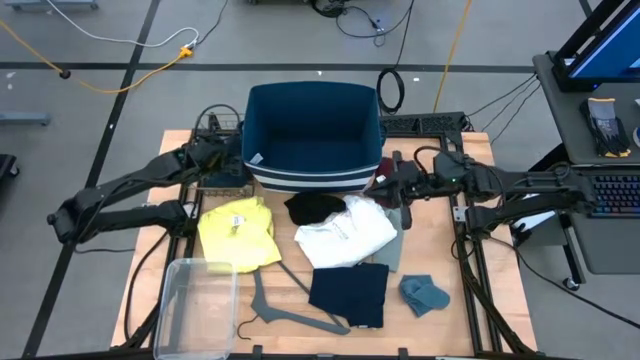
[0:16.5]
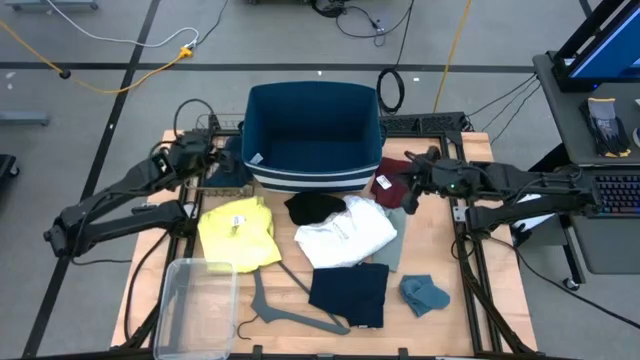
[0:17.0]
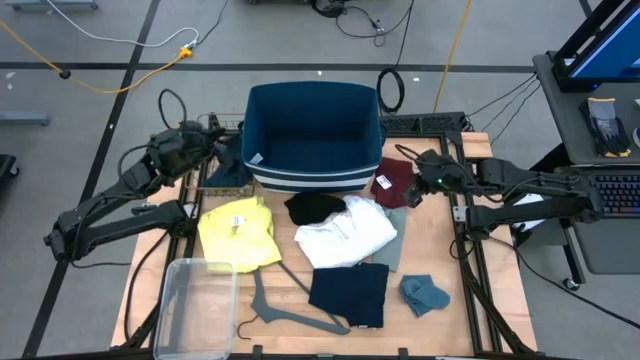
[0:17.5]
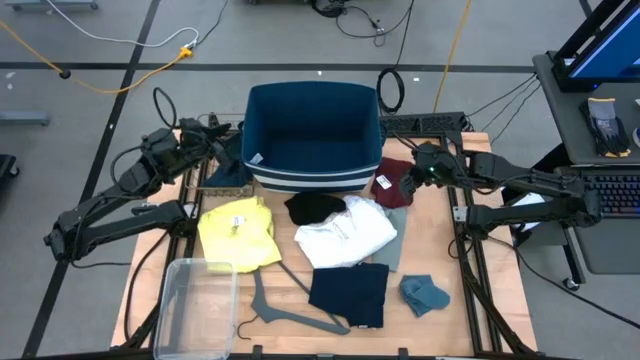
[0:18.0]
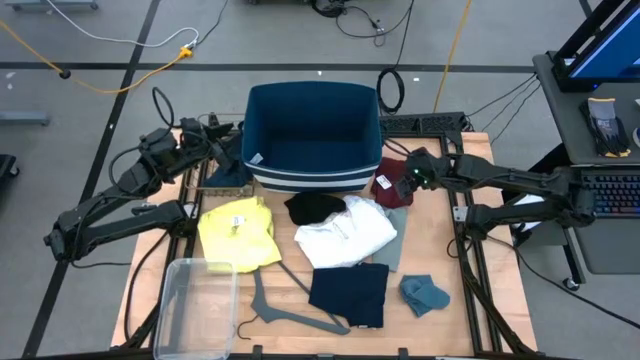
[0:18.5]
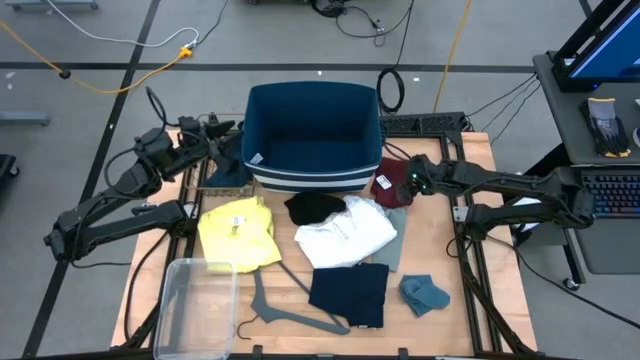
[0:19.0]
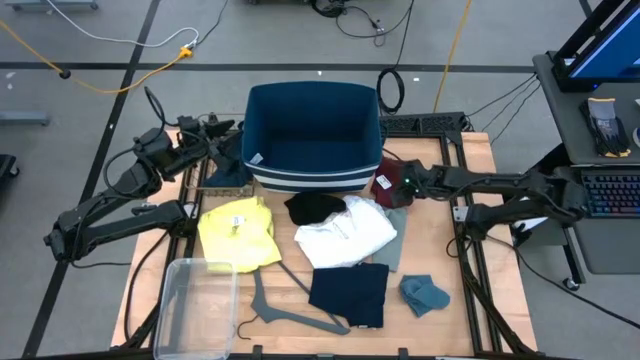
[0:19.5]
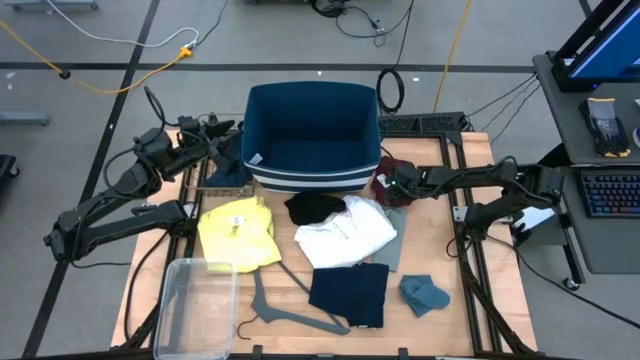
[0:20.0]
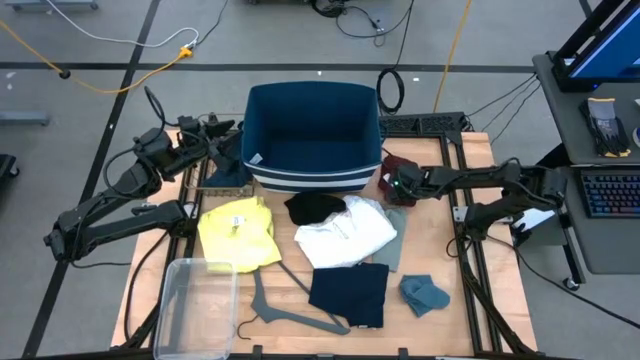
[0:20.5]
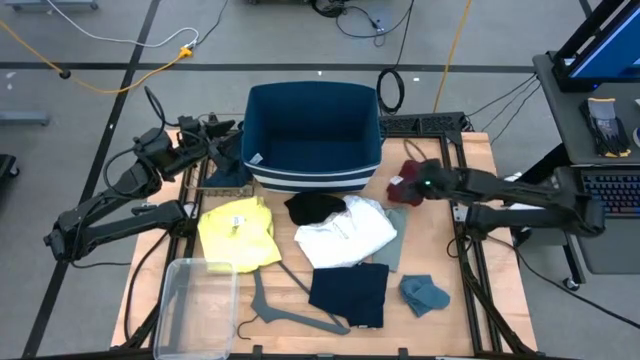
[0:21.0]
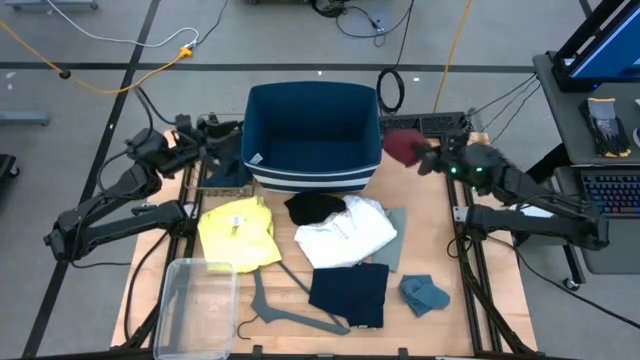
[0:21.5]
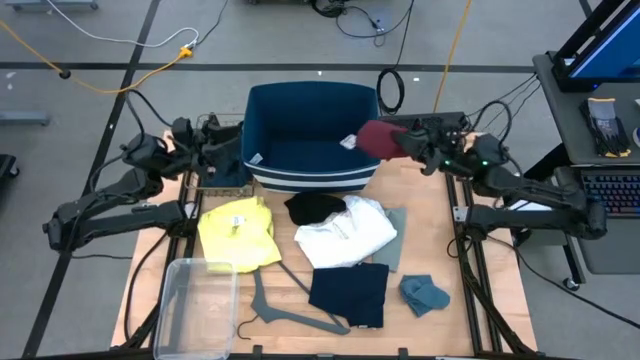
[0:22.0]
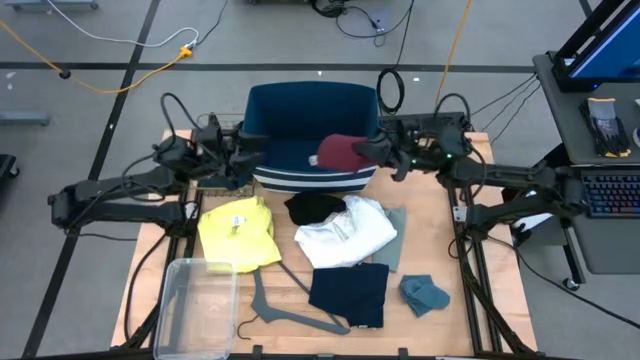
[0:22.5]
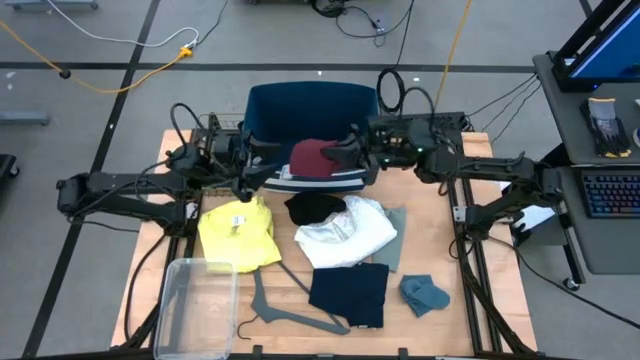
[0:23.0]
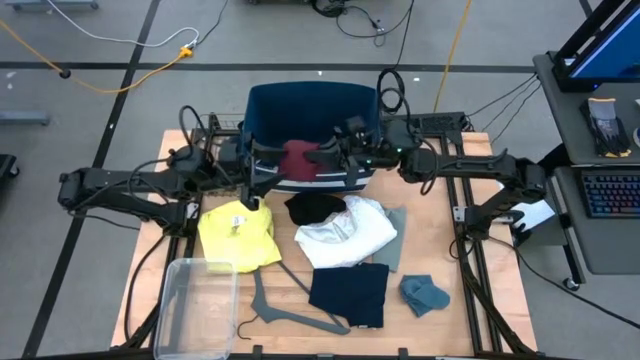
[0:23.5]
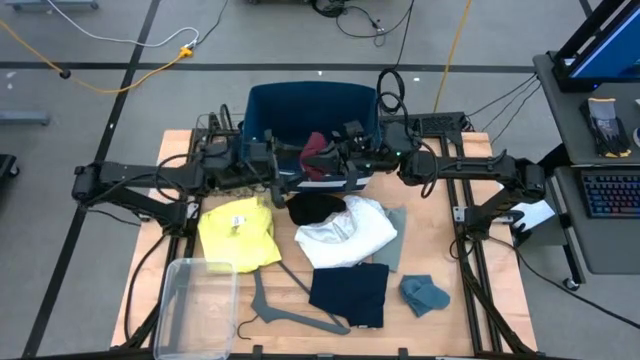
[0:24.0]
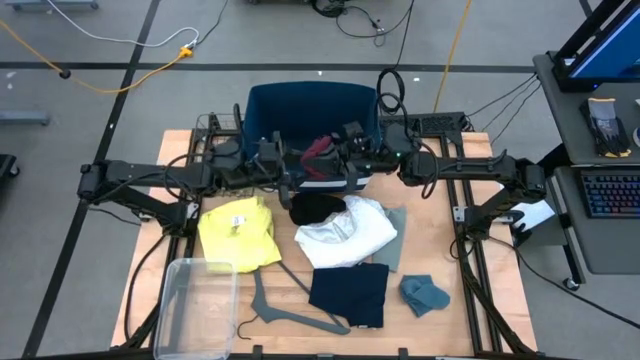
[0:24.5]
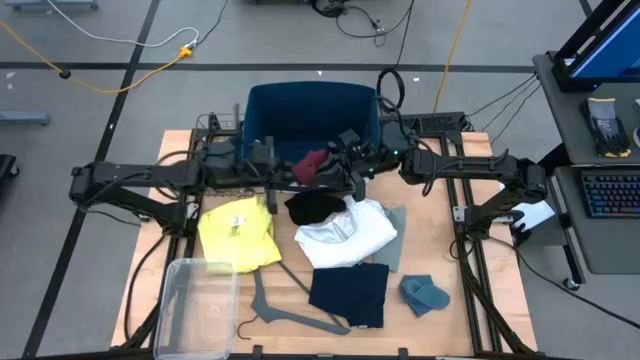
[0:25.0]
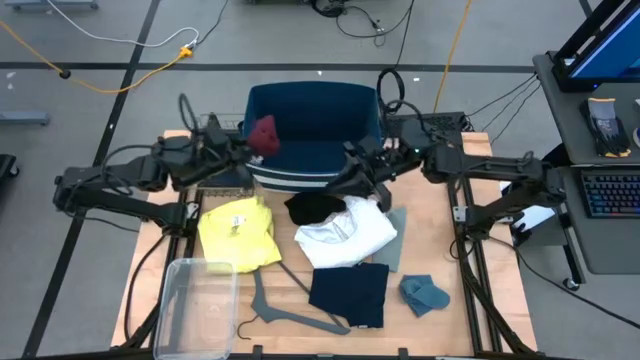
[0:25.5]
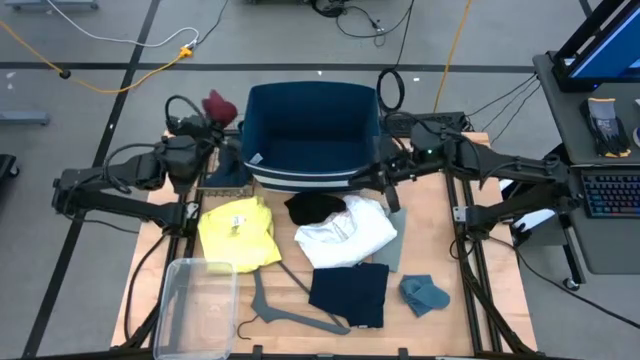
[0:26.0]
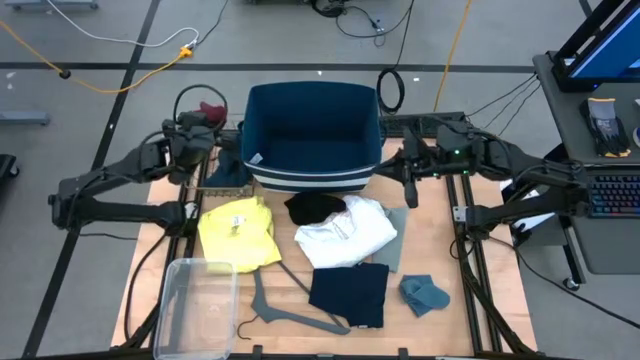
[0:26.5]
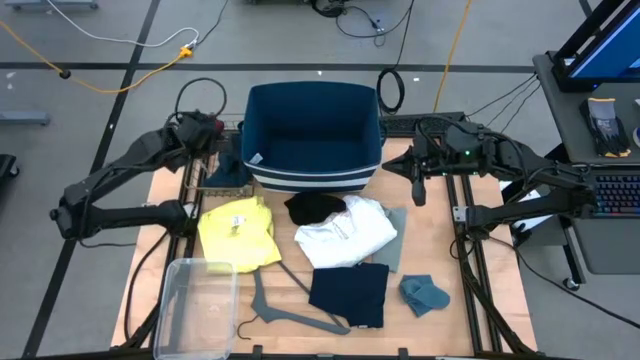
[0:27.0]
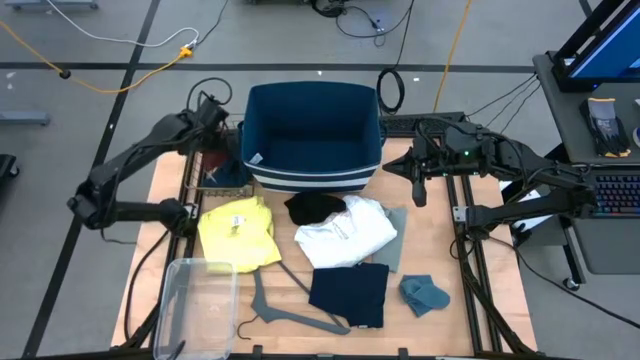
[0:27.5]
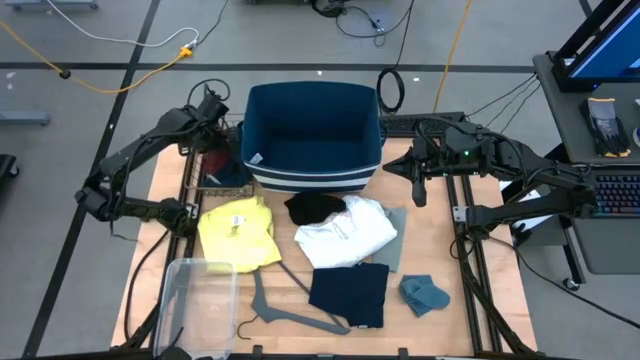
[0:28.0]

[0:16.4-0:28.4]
Task: Pick & Place Cloths
Put the red shorts into the brown wire basket

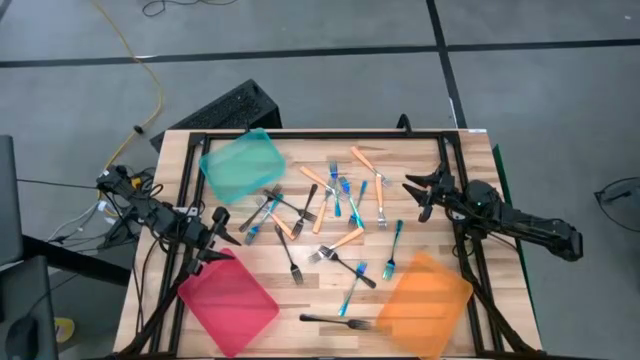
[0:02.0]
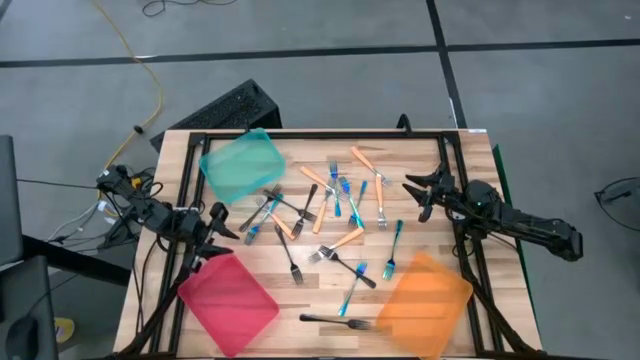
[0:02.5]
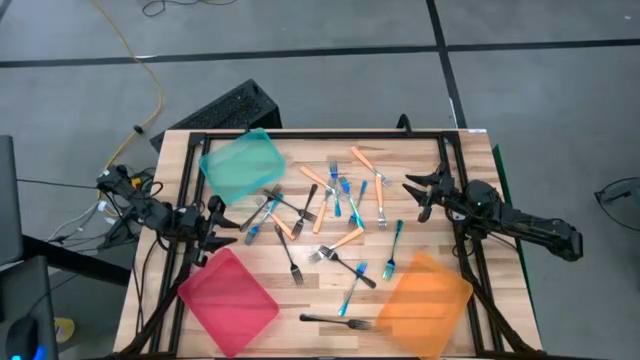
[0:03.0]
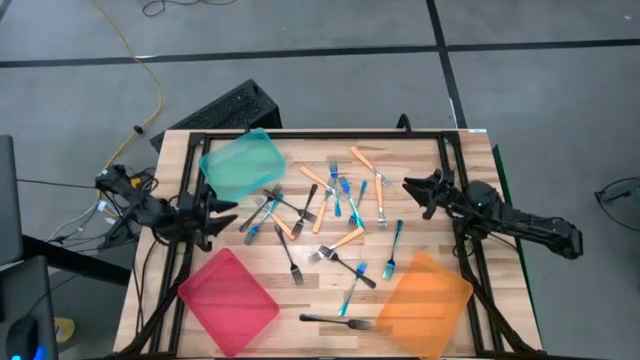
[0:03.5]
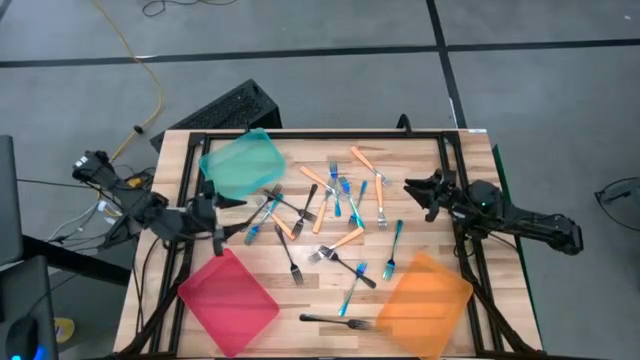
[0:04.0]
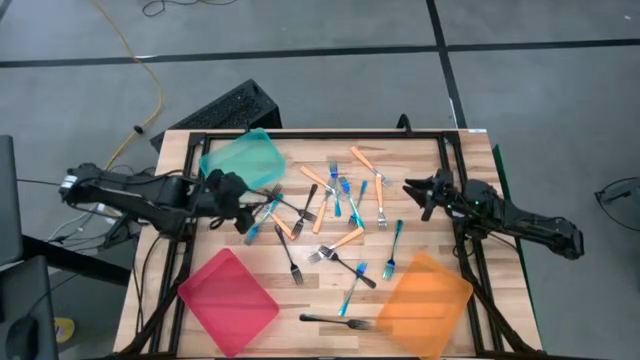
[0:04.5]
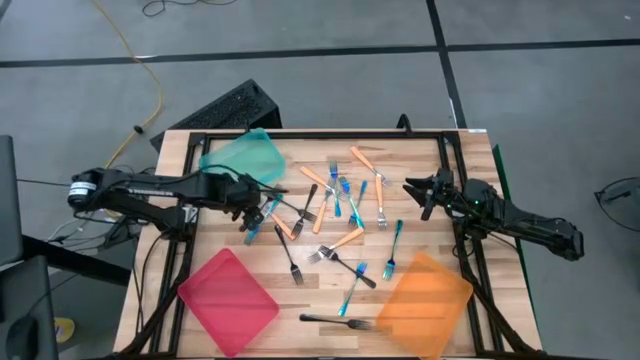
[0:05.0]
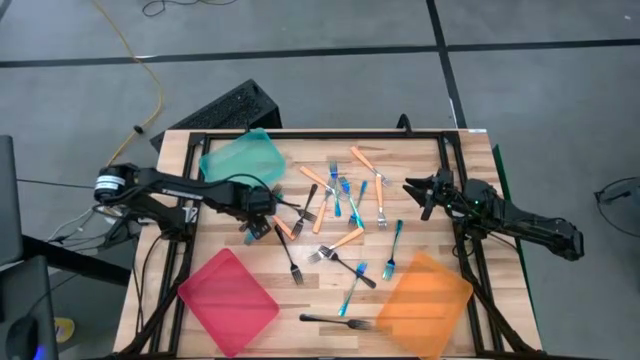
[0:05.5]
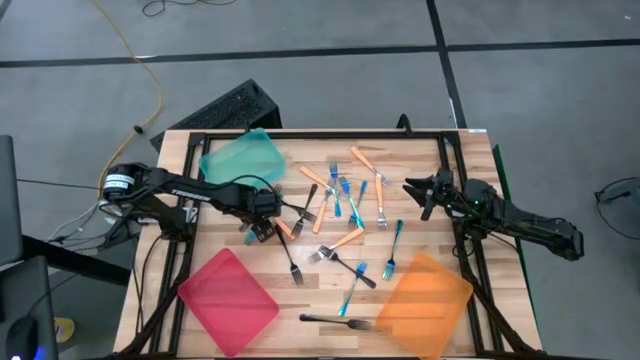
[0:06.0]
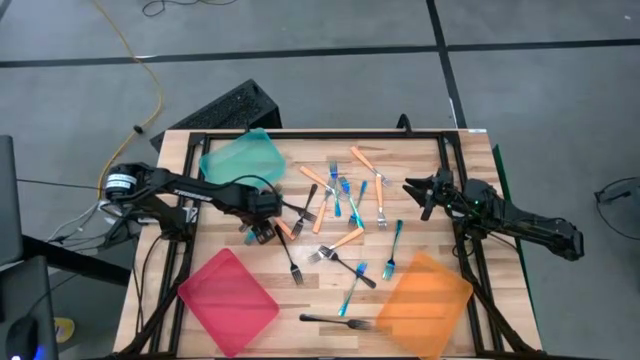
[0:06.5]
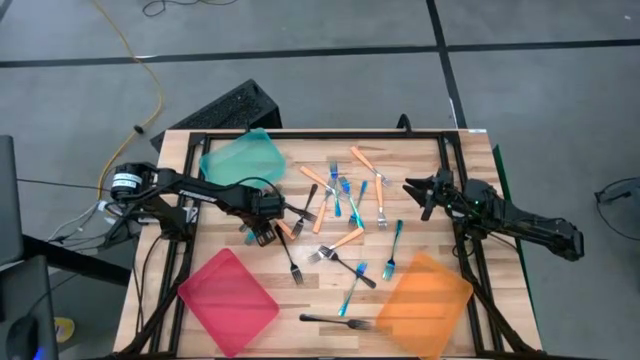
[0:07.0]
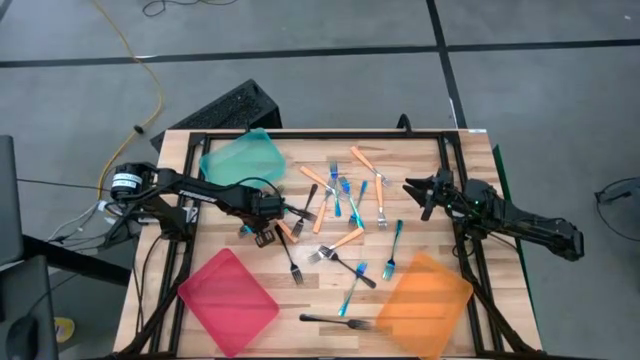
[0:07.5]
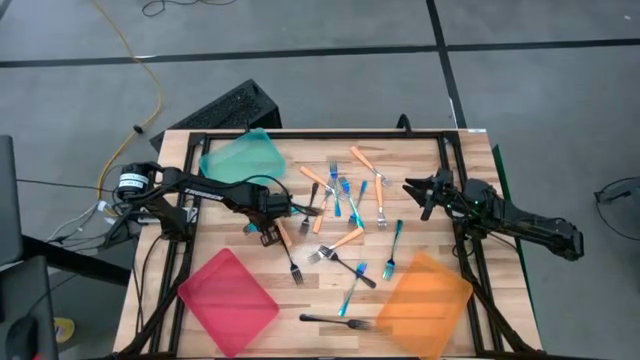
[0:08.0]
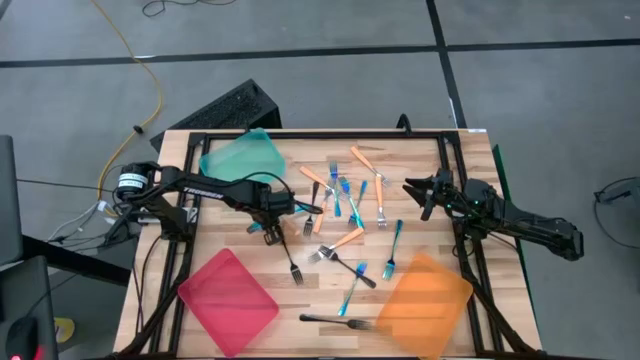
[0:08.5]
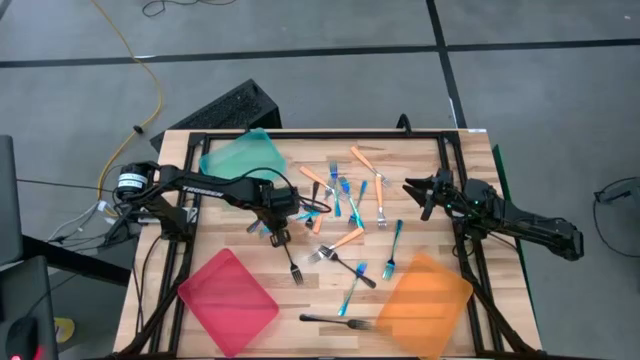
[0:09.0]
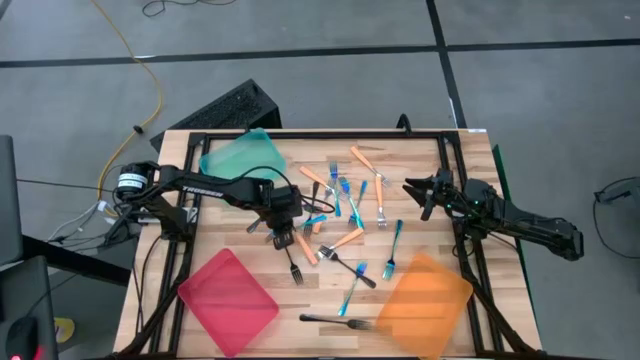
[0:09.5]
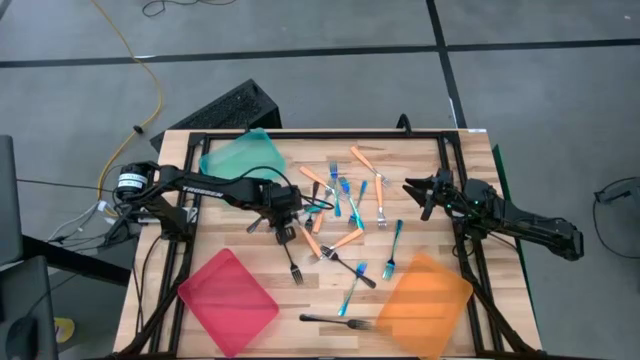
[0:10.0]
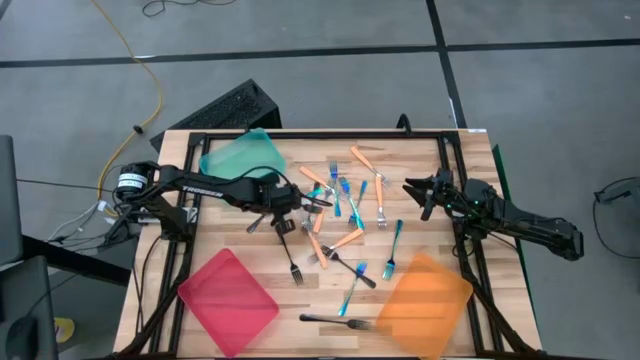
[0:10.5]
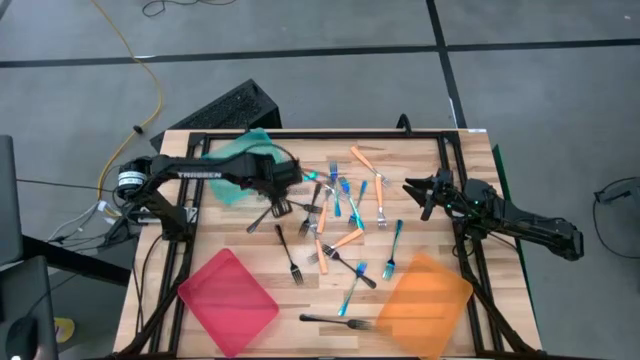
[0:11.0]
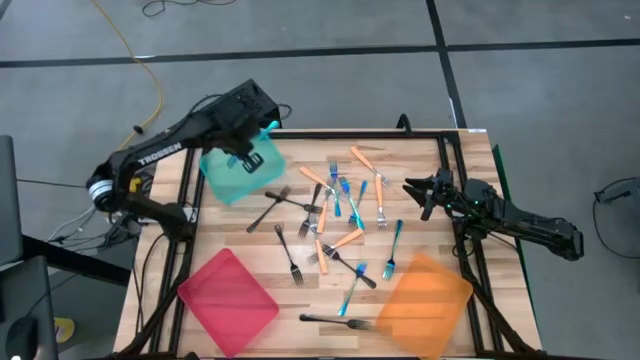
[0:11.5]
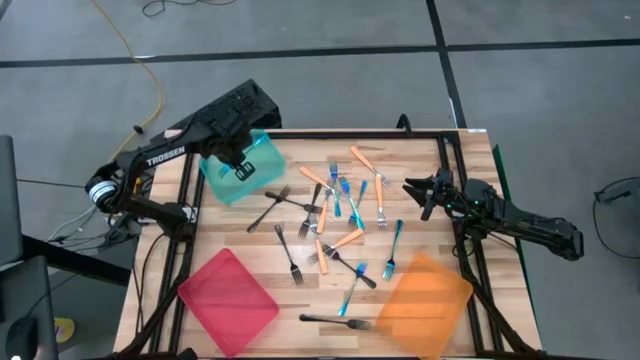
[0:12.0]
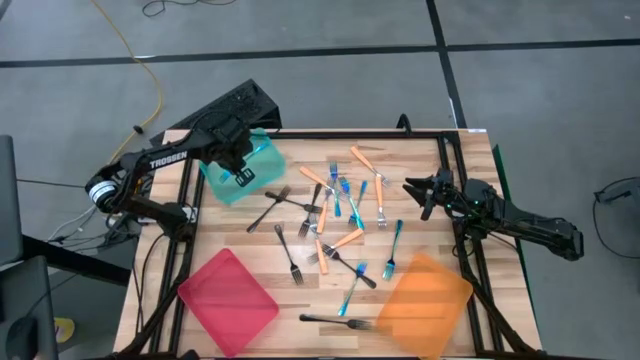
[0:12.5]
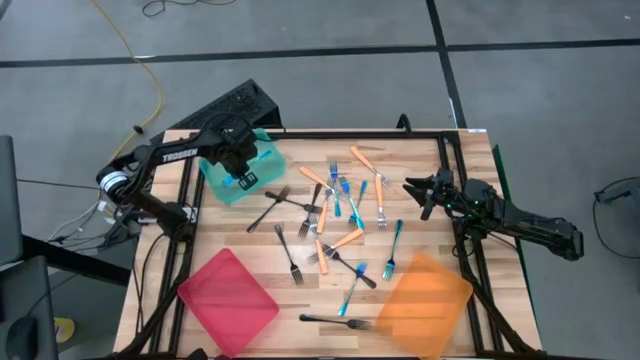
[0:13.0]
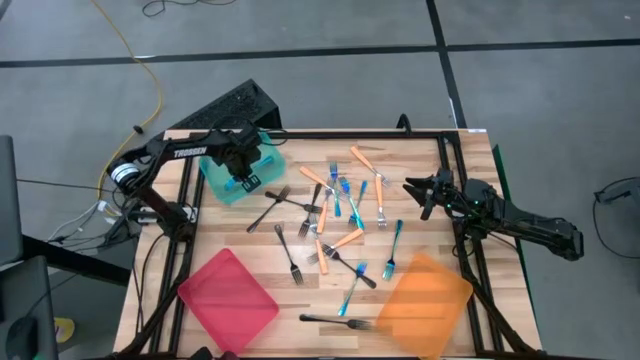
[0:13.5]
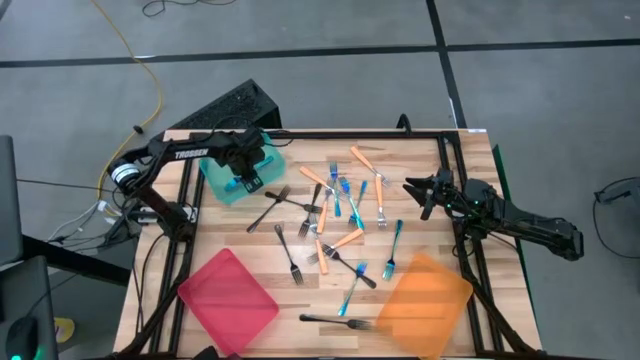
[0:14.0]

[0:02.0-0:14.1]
Task: Sort silverware by color (type)
Put the blue fork into the blue bin
